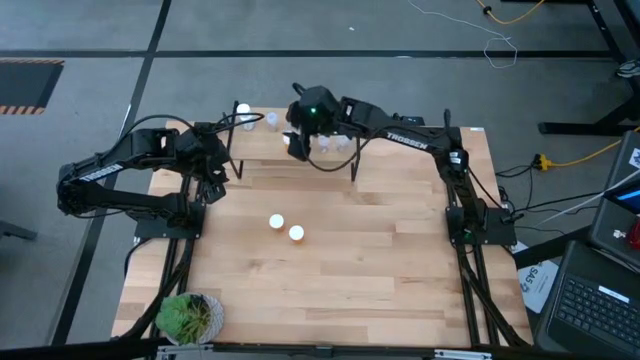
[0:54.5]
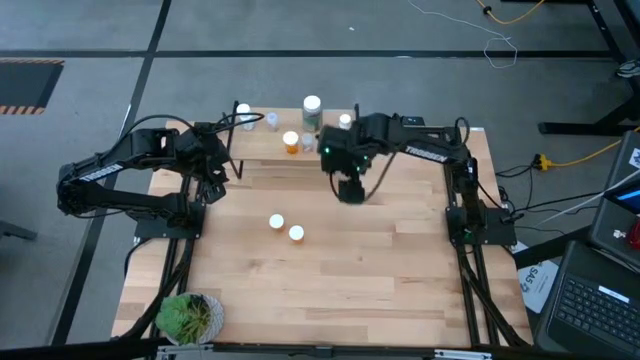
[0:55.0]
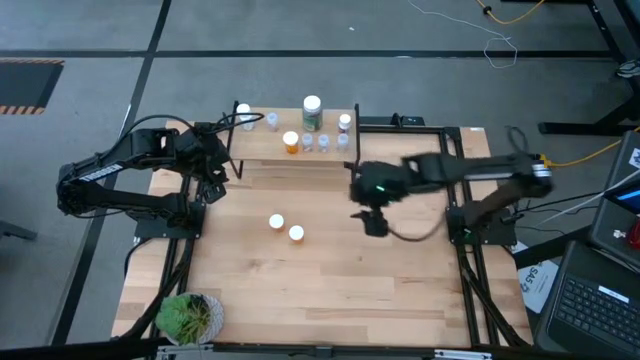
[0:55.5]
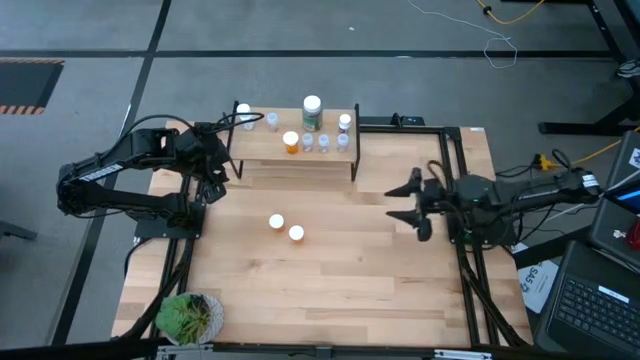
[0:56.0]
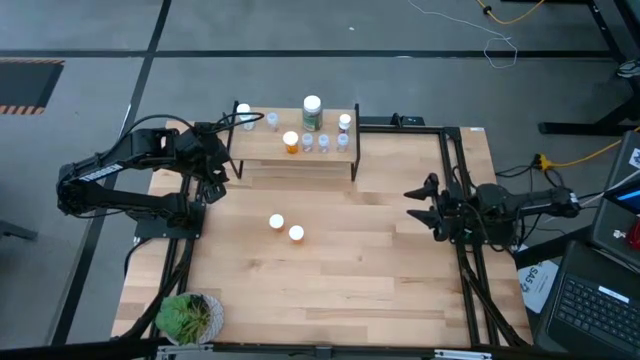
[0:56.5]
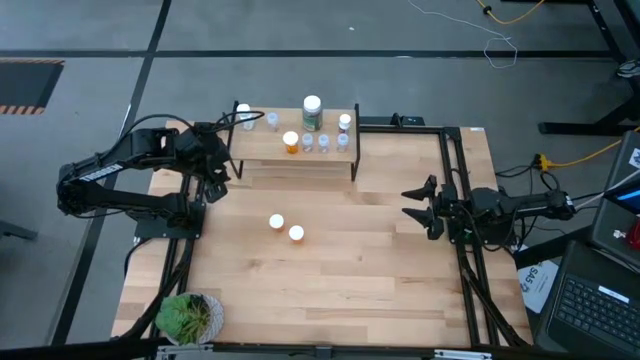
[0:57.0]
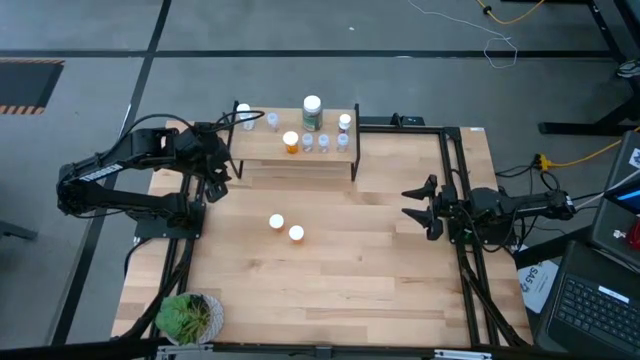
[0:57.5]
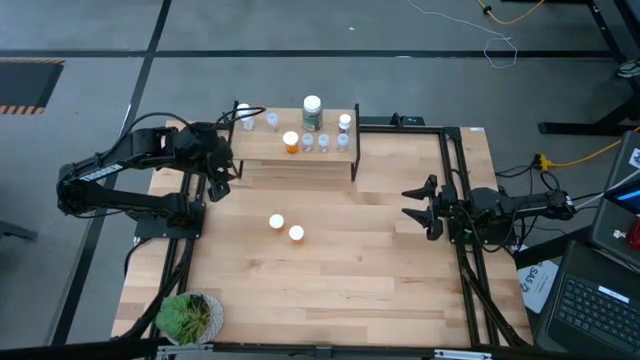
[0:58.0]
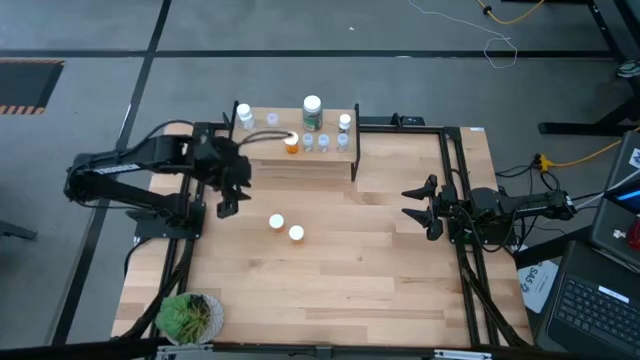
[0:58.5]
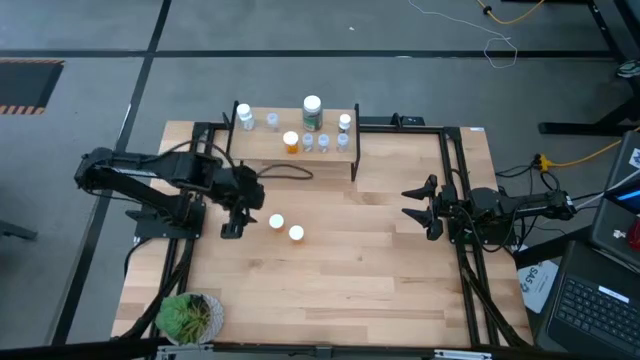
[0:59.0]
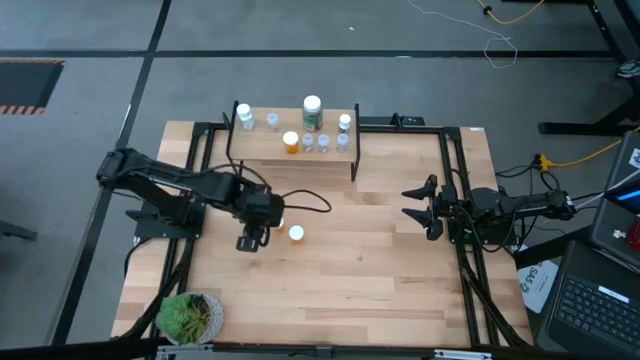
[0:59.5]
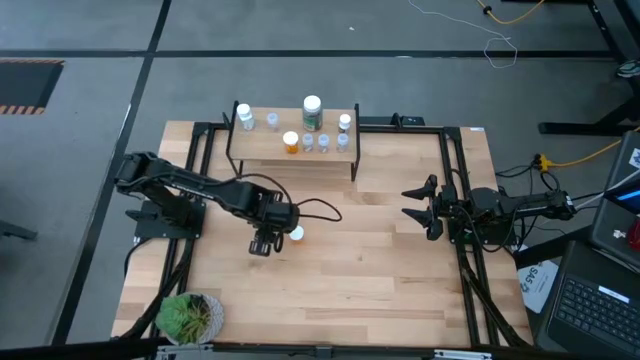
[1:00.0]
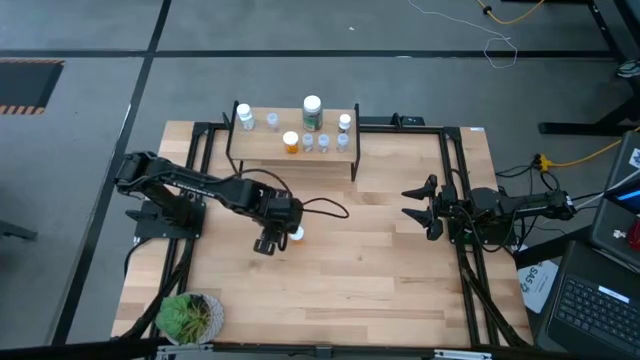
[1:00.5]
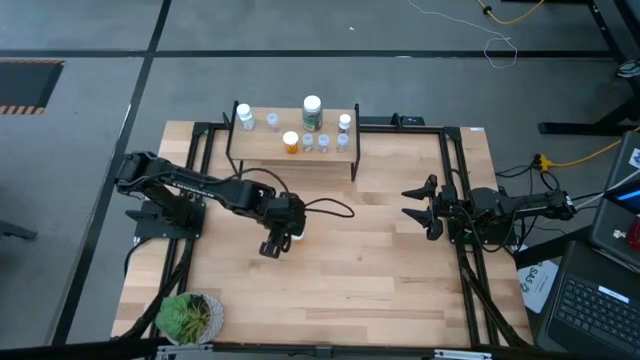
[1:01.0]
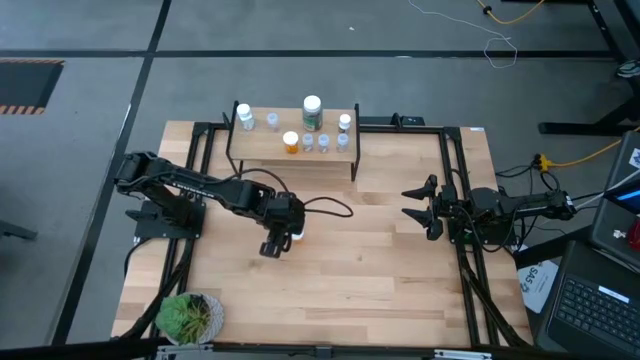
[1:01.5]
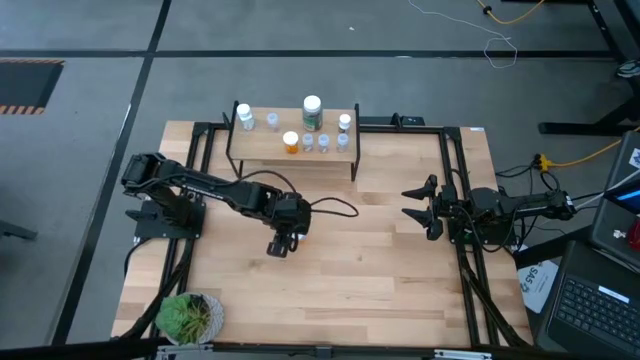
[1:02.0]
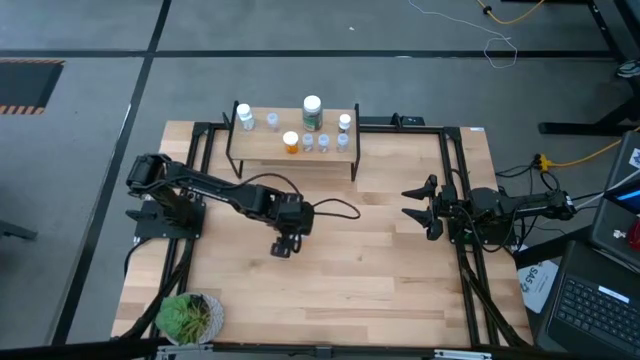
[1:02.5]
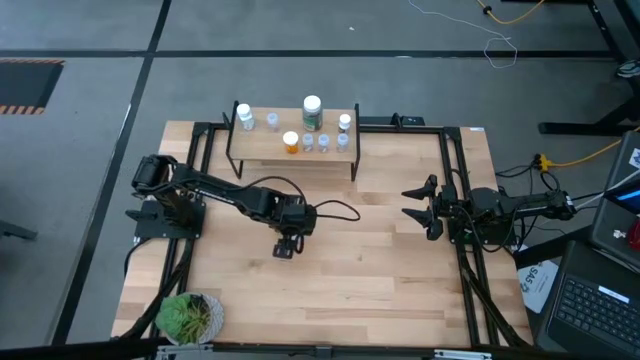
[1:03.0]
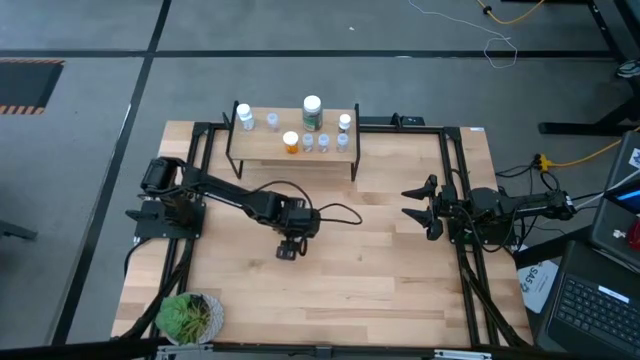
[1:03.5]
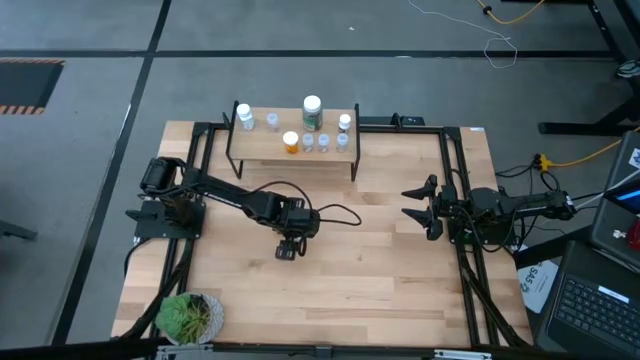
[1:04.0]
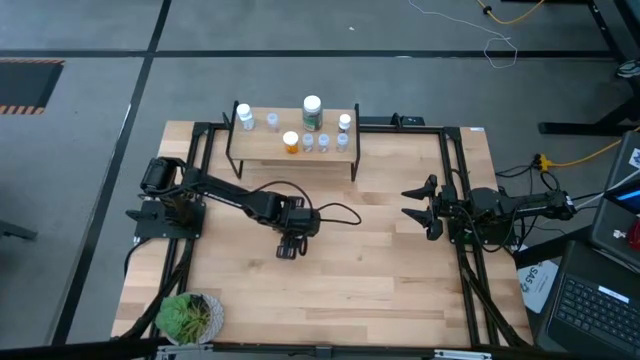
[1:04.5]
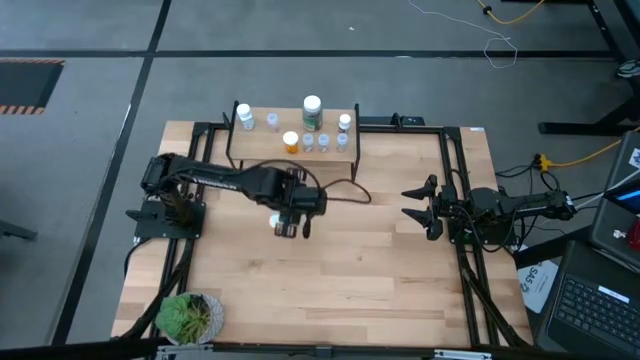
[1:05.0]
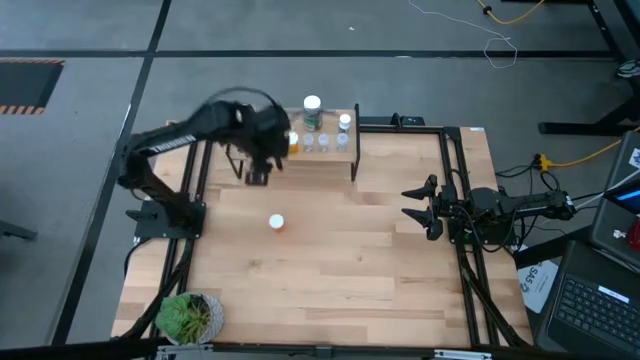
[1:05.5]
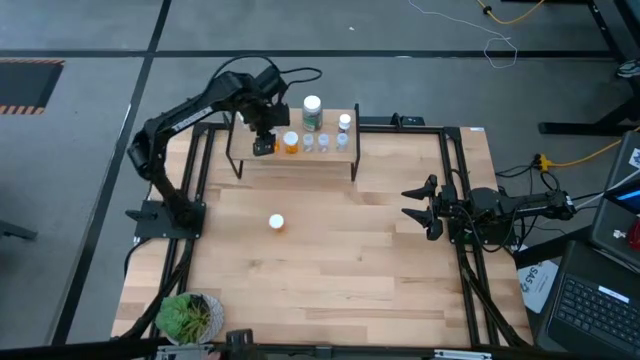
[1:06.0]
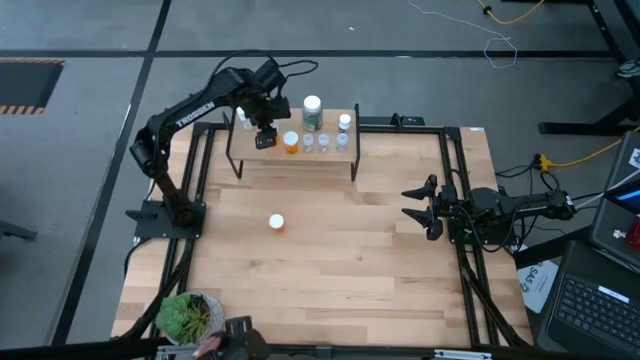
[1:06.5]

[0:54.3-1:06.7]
Task: Pick and place medicine bottles onto shelf by color
Put the orange pill bottle on the shelf

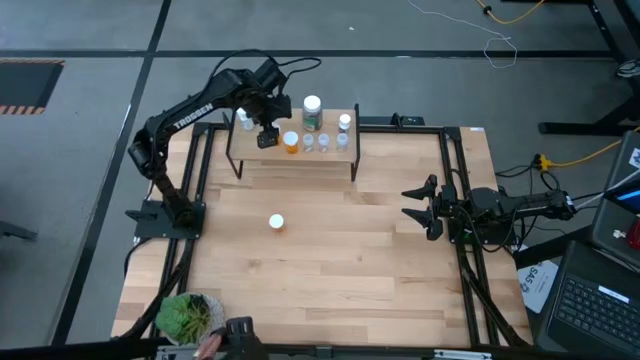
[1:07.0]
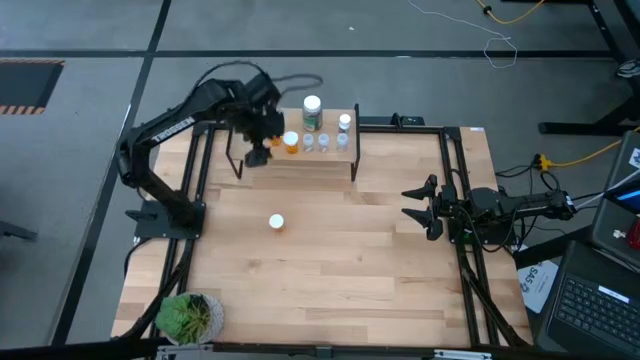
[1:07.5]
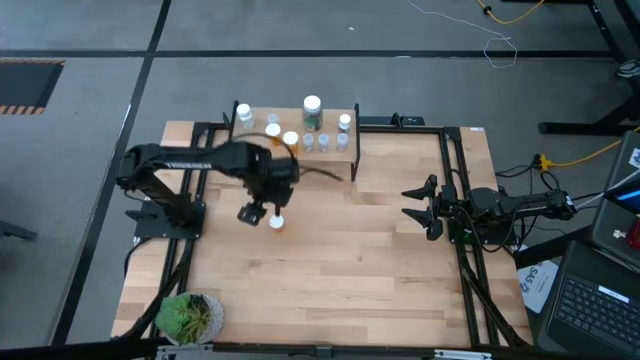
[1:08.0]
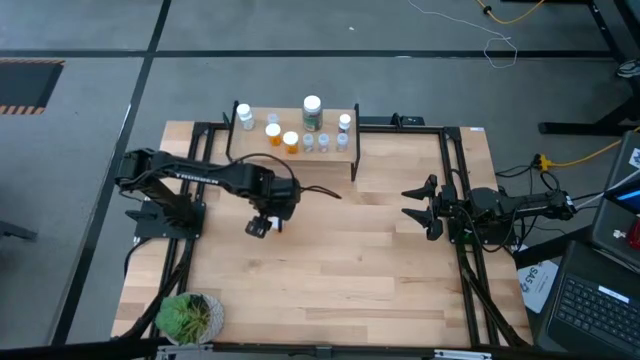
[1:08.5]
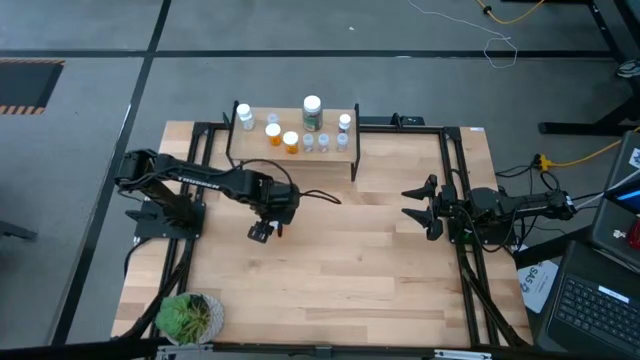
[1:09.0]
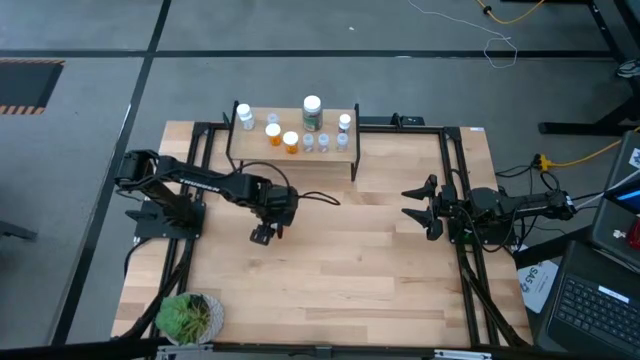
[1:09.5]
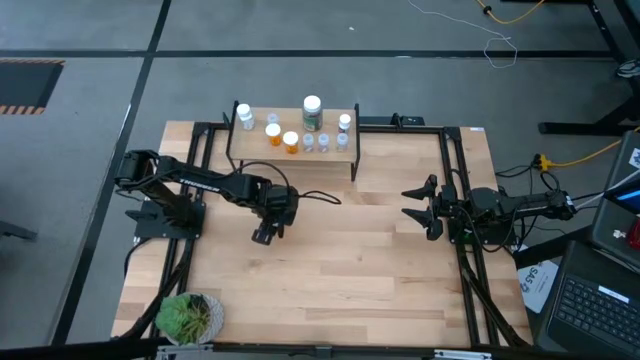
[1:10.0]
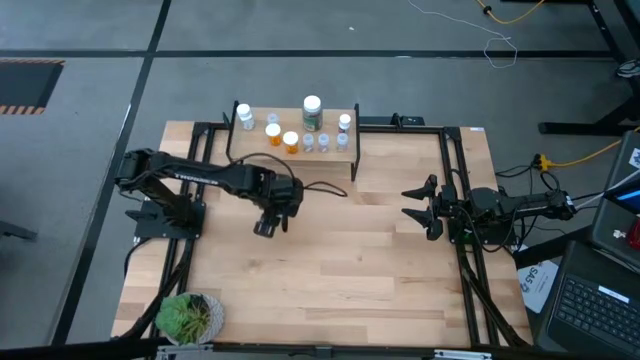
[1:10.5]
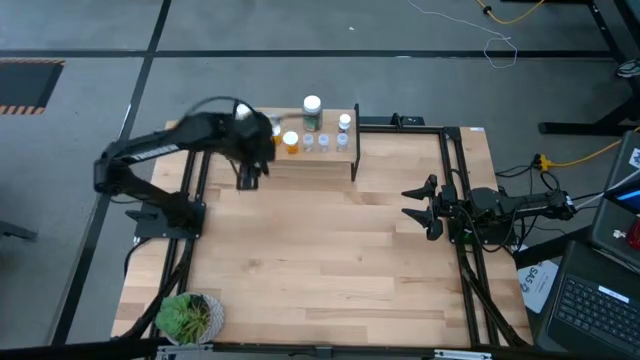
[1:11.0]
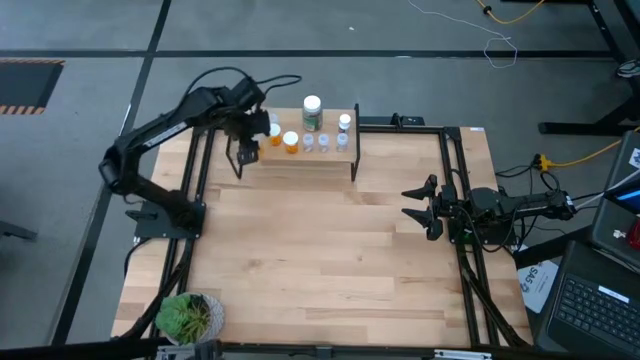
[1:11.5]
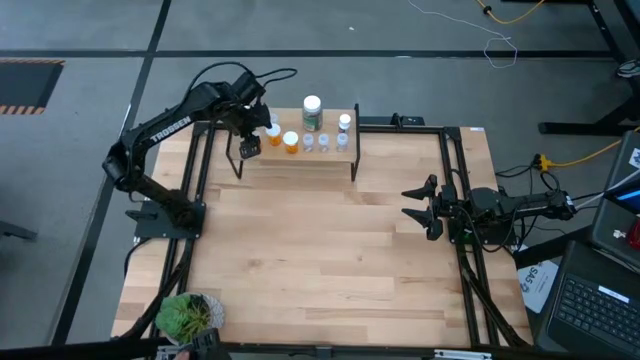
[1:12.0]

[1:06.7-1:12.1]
Put the orange pill bottle on the shelf

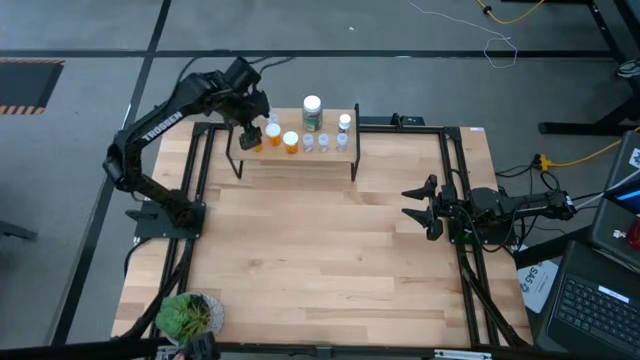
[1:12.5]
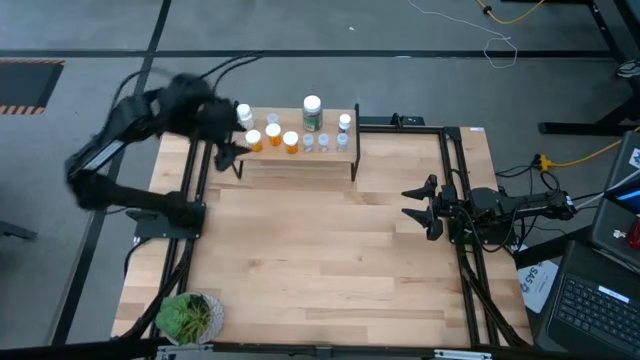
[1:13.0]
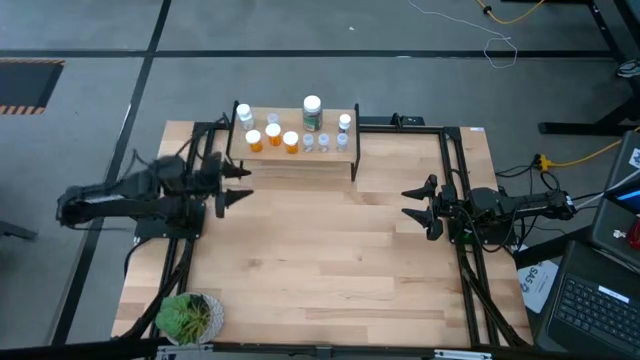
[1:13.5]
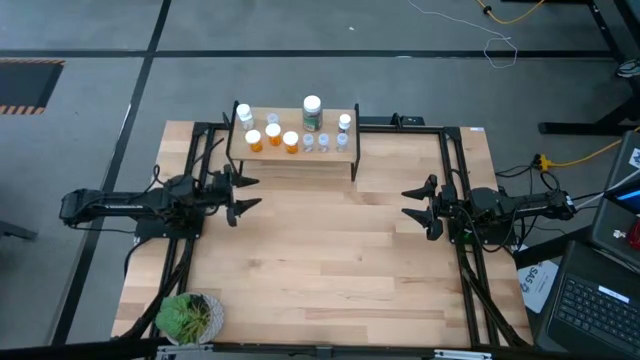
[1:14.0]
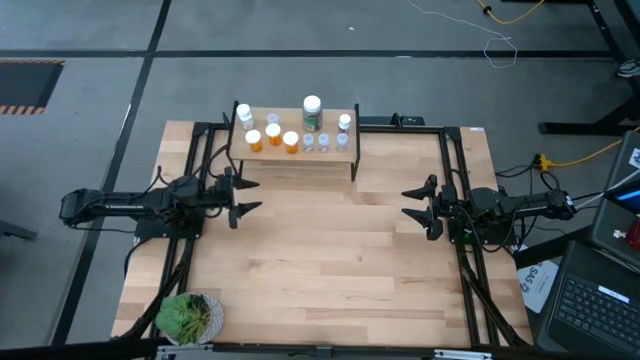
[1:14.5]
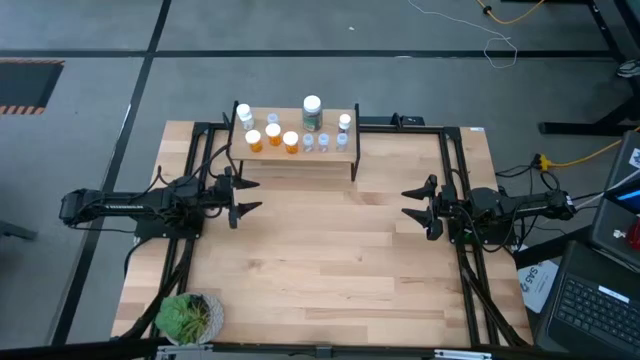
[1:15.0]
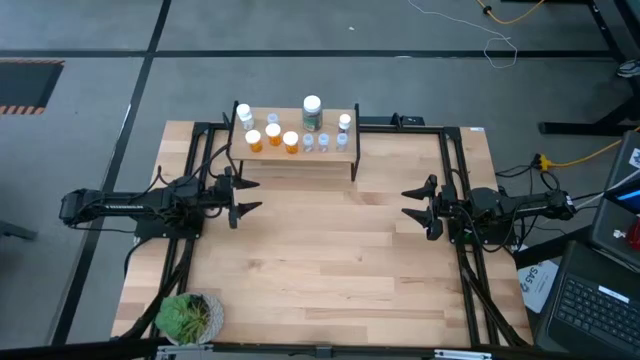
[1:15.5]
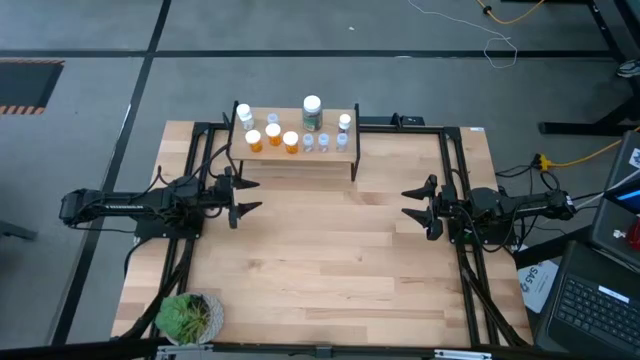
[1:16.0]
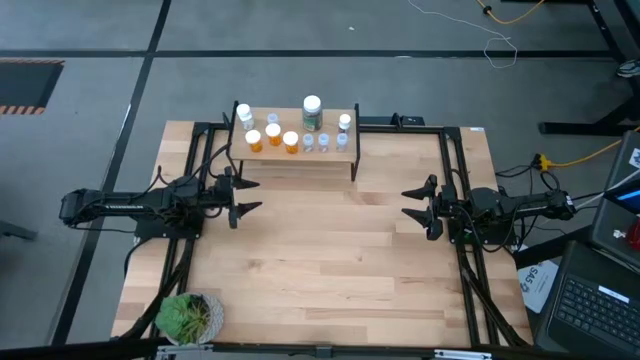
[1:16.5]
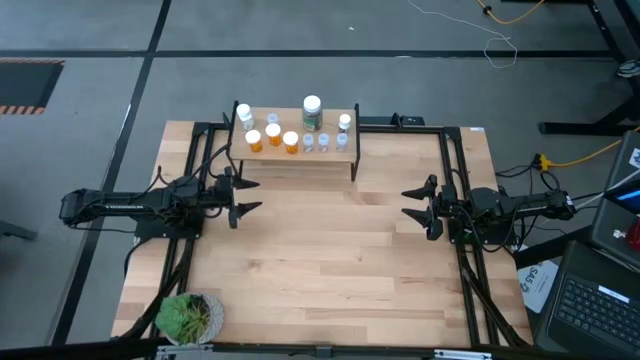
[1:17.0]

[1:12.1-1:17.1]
Return to Home Position
